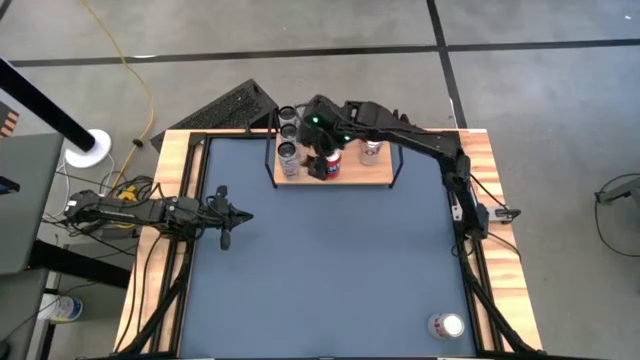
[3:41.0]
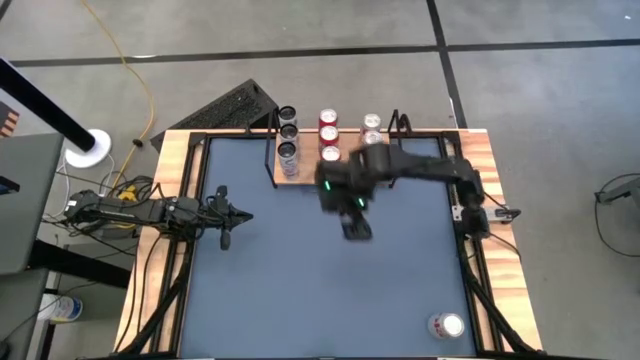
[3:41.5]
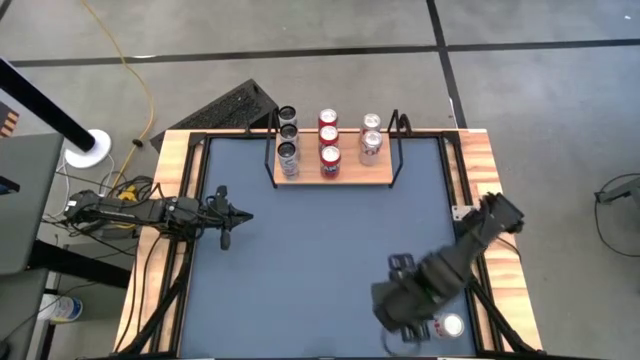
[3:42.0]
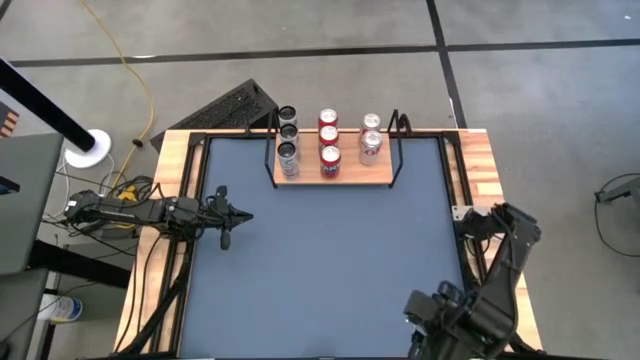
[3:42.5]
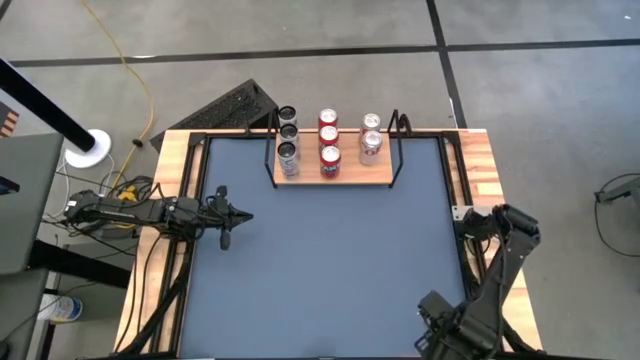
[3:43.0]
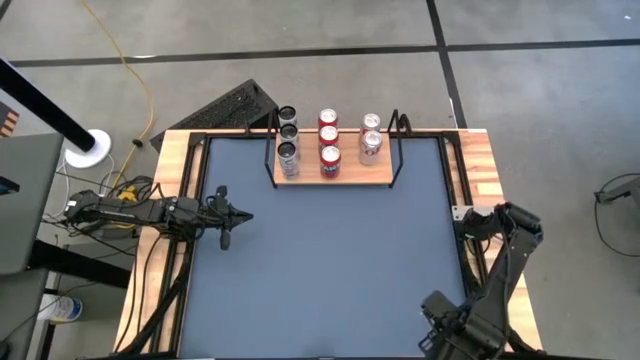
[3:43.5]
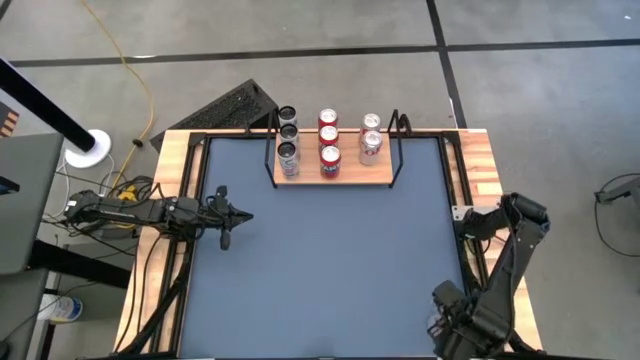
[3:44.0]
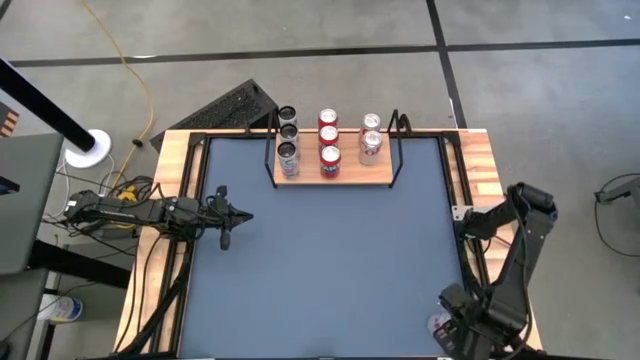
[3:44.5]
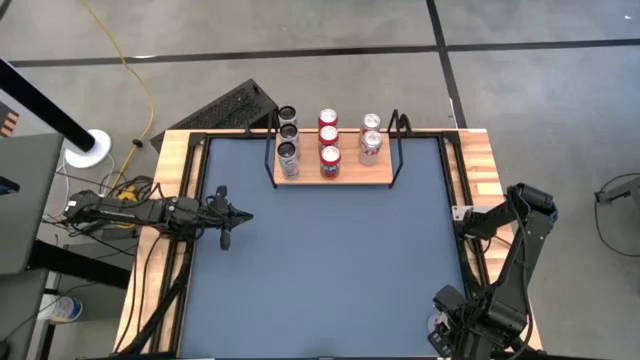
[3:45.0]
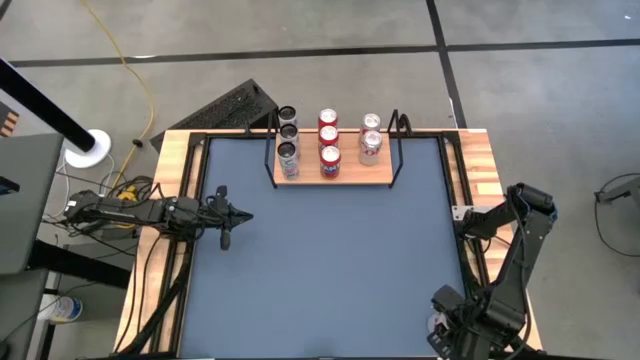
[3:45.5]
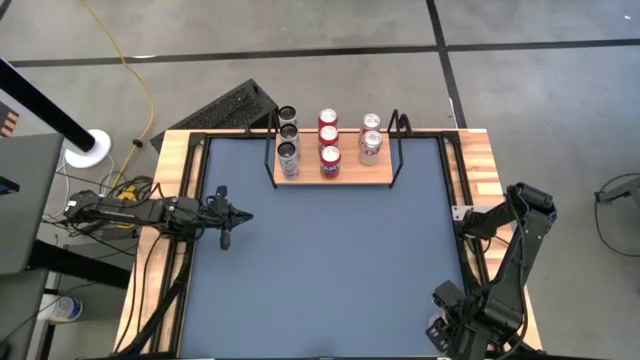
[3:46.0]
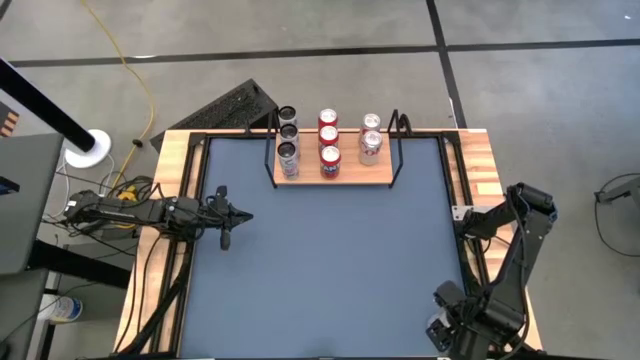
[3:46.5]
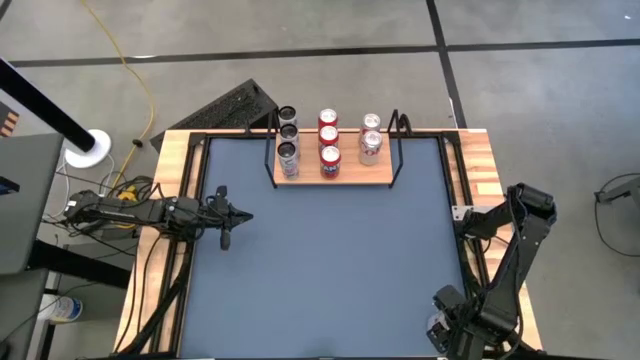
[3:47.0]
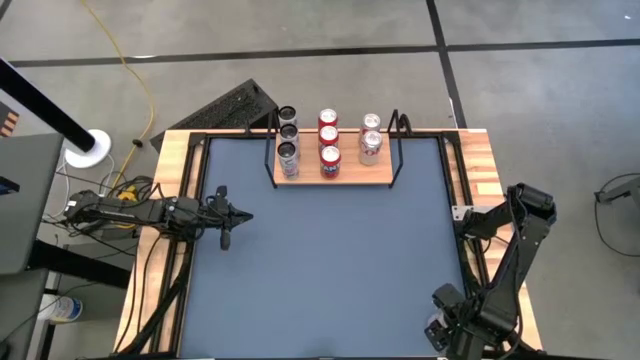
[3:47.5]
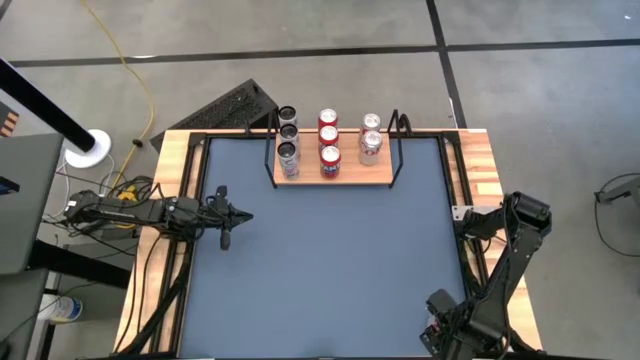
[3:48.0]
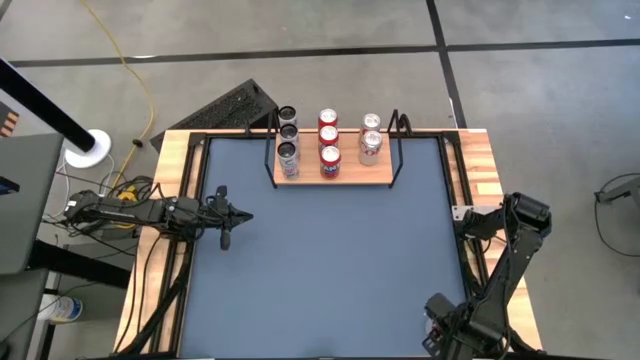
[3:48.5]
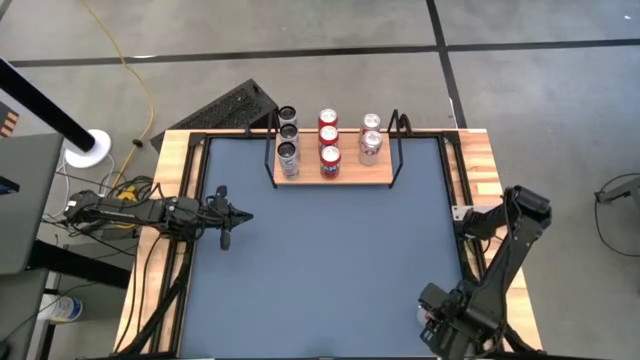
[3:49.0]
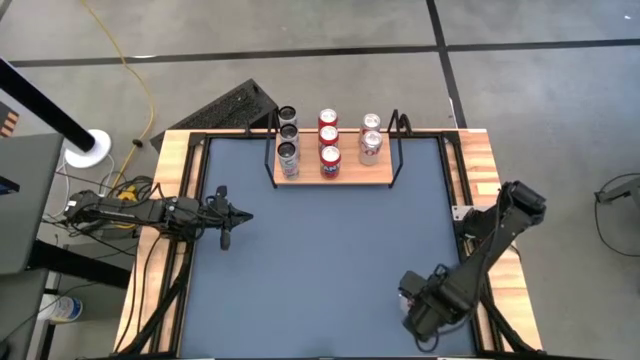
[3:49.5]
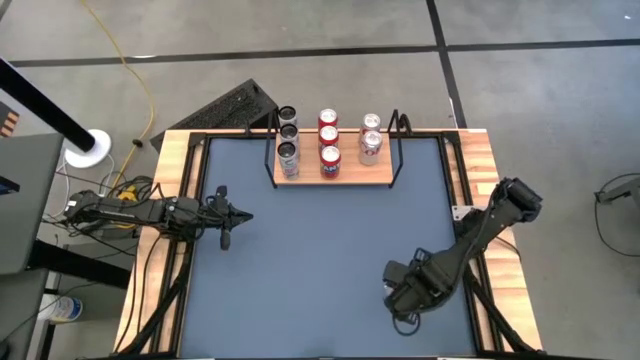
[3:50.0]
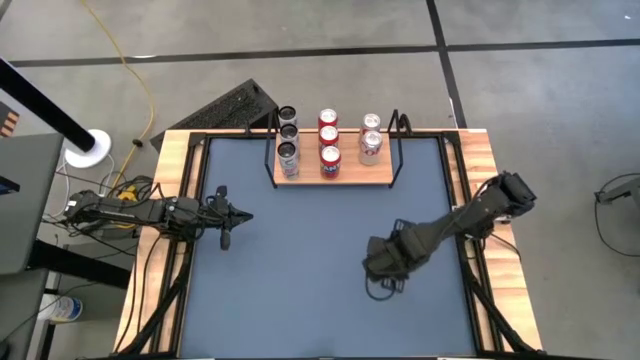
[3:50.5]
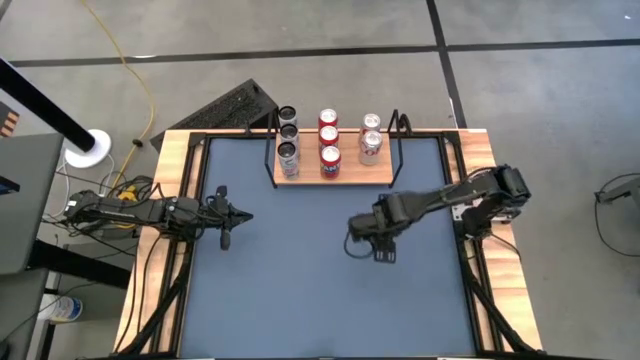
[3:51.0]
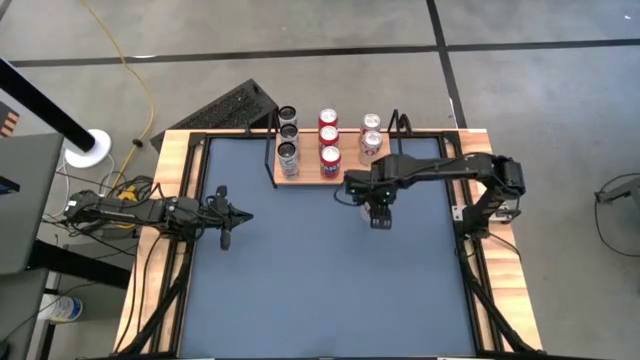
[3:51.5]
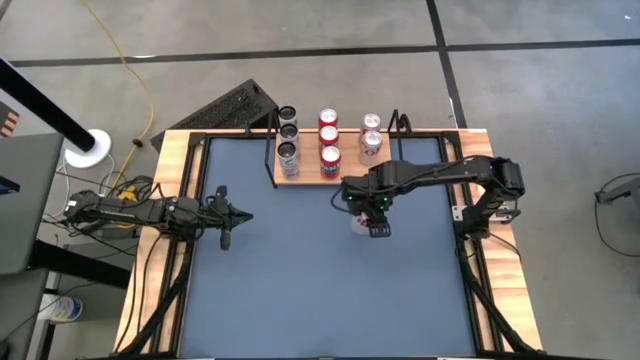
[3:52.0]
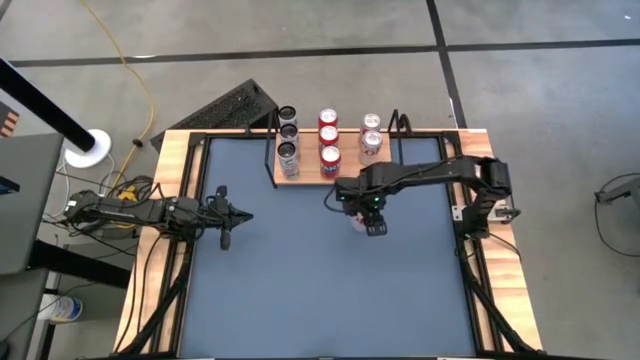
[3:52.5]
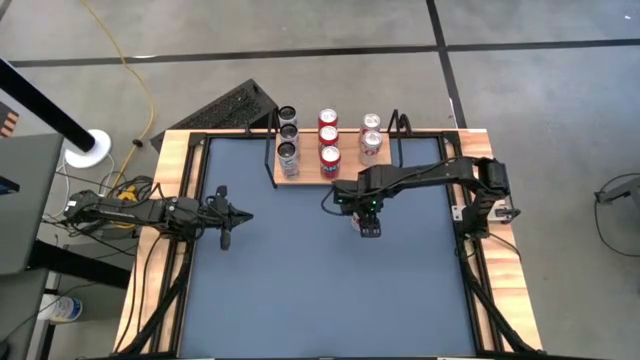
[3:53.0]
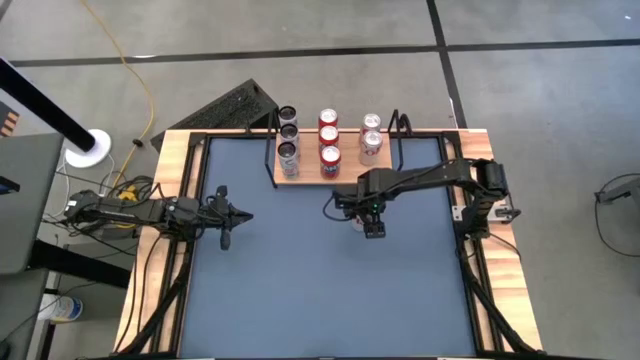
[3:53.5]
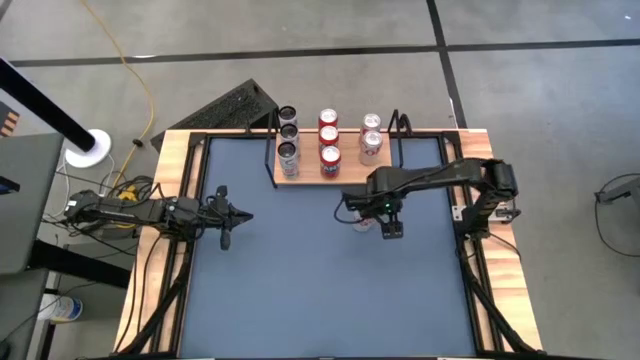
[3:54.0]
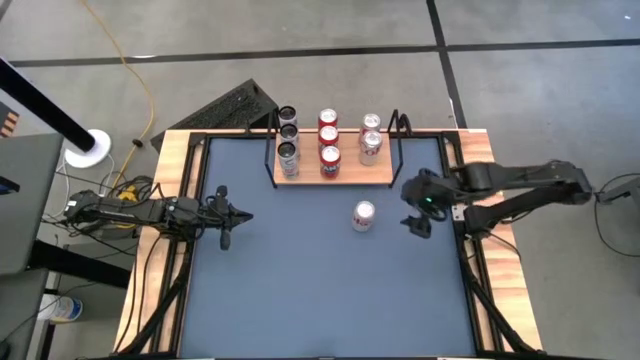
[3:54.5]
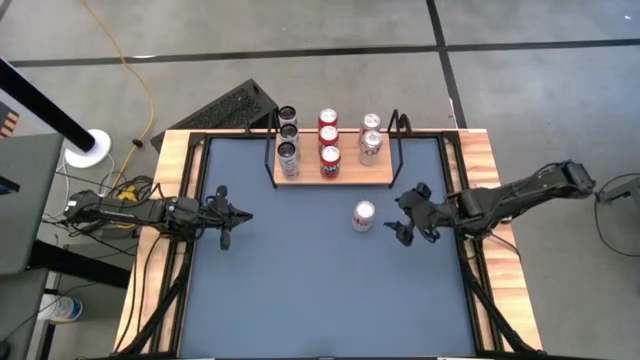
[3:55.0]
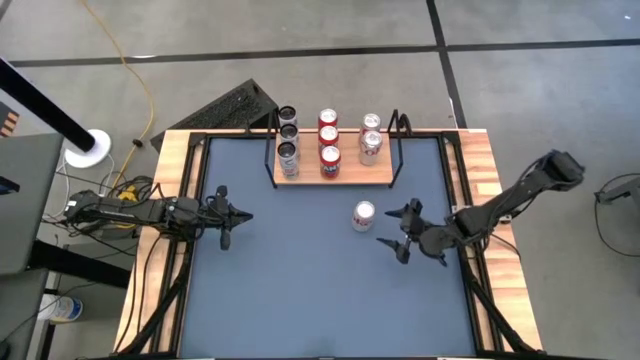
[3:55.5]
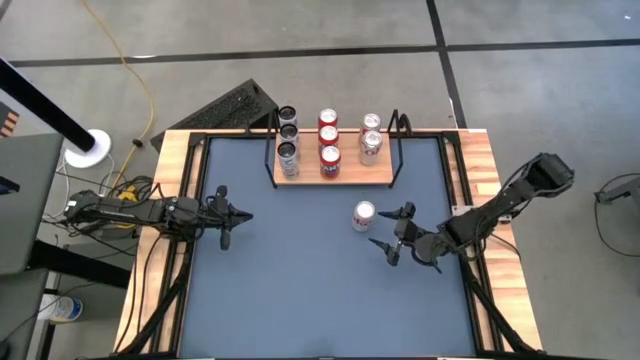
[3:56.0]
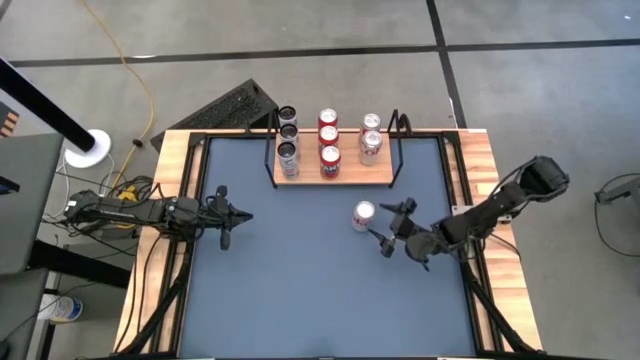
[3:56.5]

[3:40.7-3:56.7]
Task: Place canned beverage on shelf
Put the red-silver soda can on the shelf aligned with the other red-silver soda cans

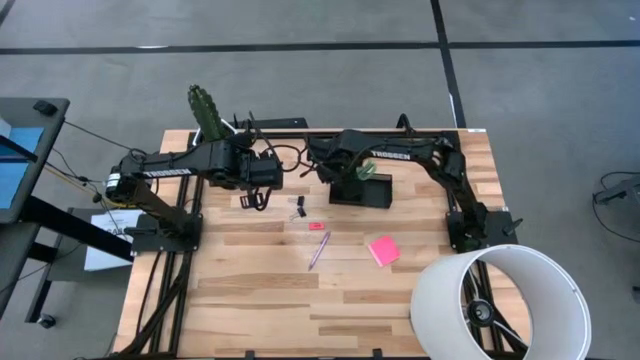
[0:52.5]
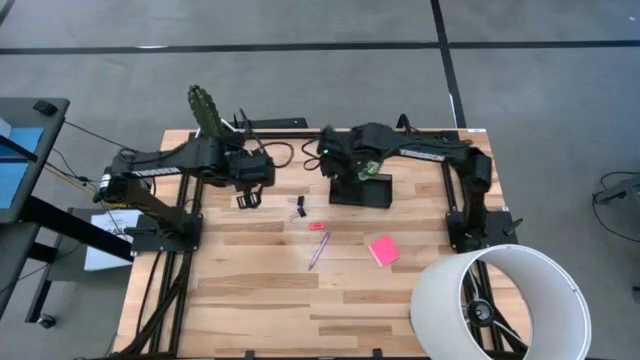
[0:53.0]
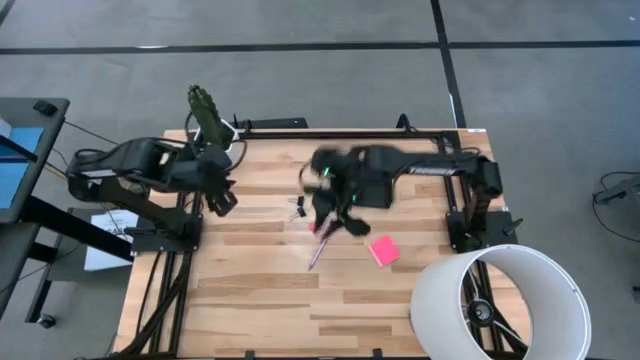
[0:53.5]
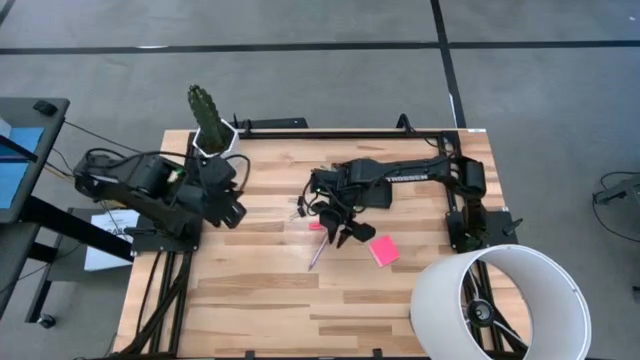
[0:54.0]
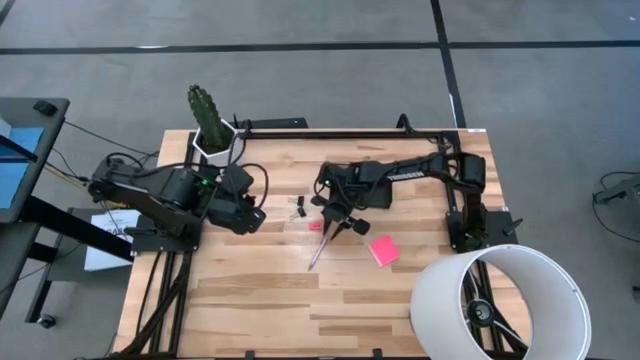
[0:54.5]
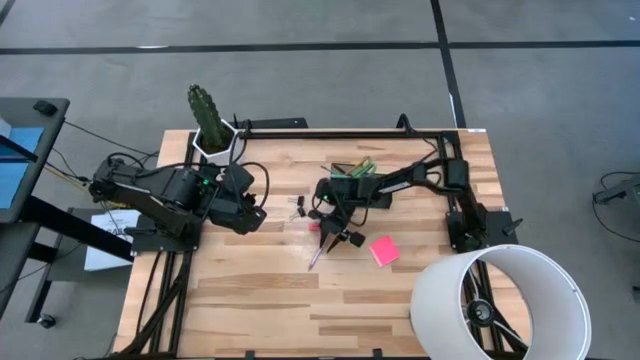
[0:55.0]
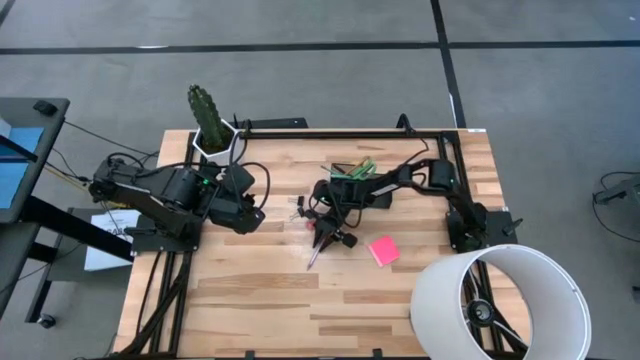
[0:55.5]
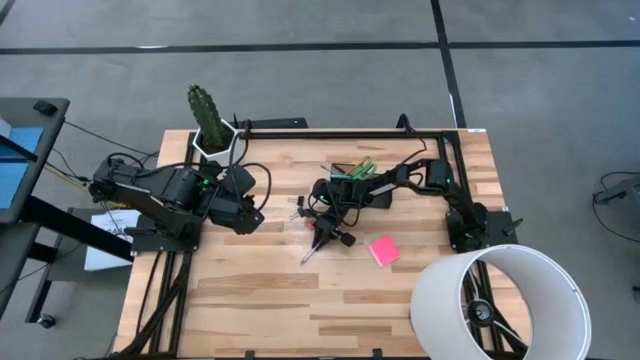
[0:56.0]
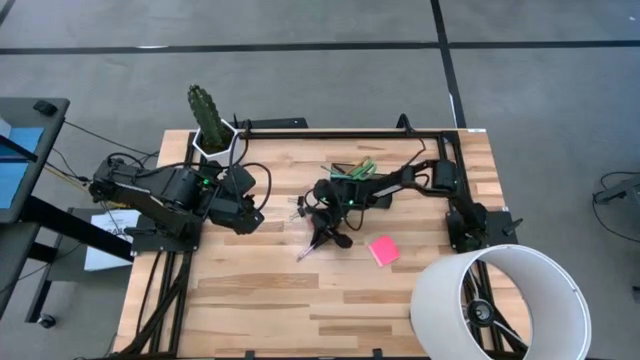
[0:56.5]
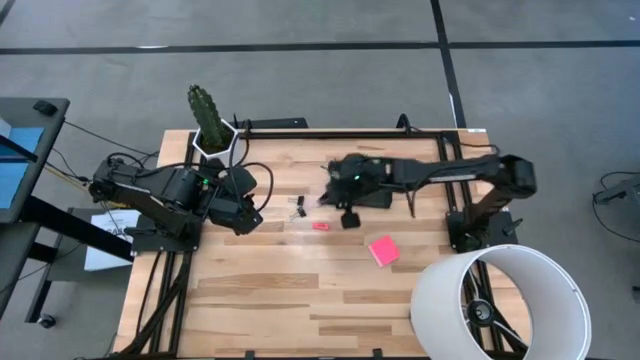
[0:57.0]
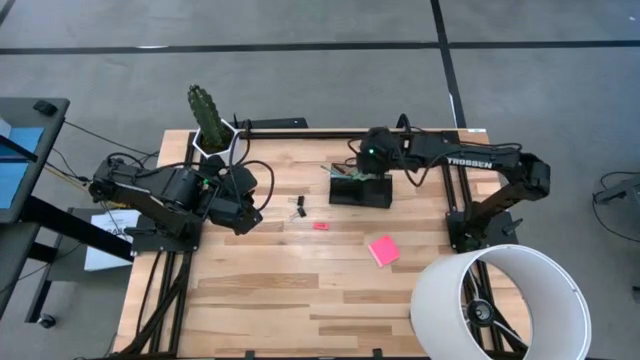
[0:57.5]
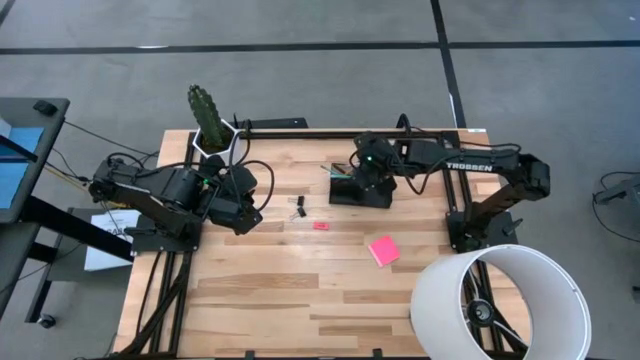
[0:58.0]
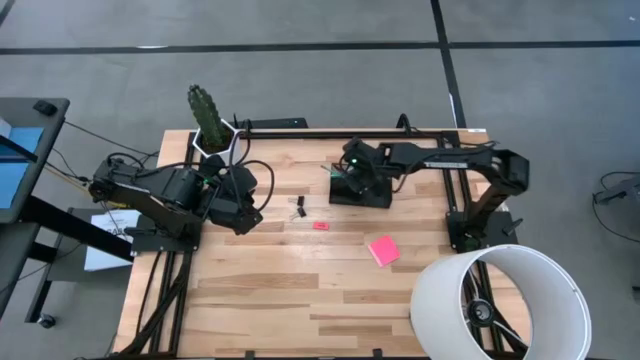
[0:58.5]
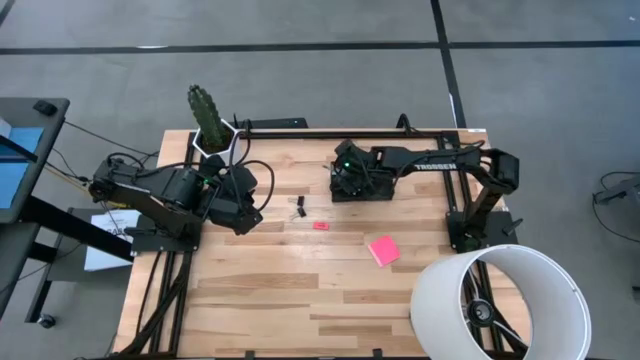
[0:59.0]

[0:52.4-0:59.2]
Task: Pick and place office supplies into organizer
Put the purple pen into the black desk organizer
